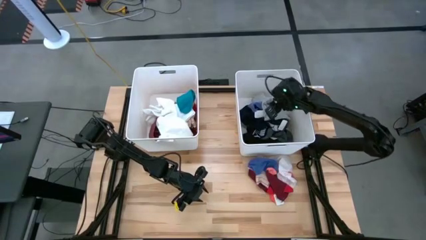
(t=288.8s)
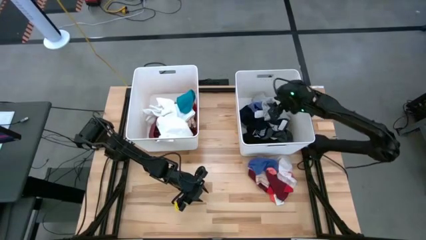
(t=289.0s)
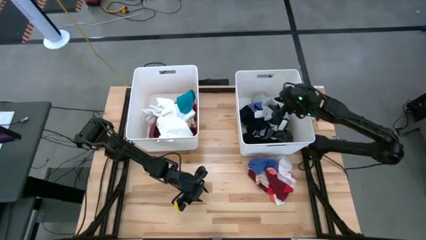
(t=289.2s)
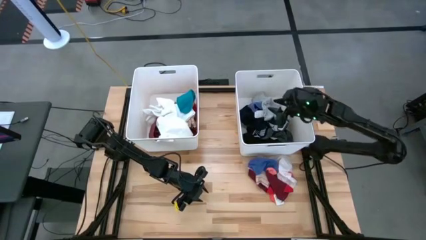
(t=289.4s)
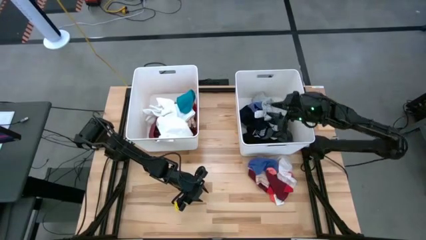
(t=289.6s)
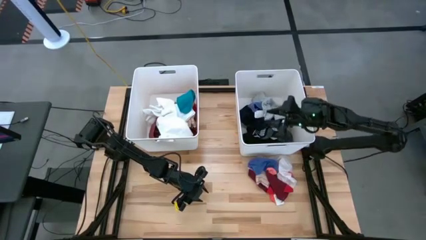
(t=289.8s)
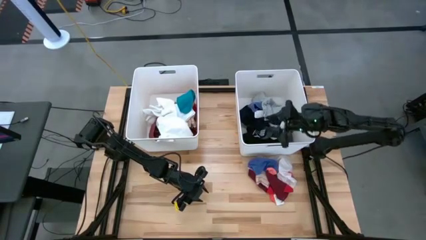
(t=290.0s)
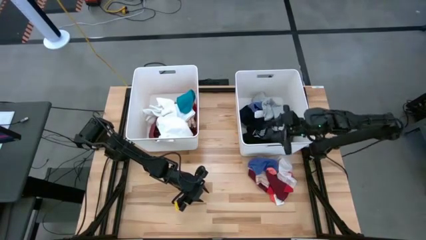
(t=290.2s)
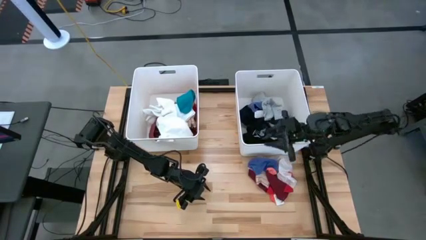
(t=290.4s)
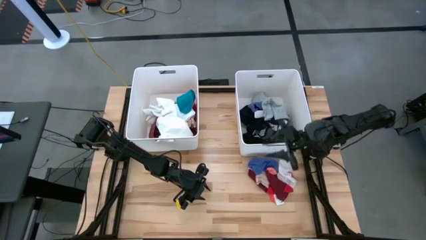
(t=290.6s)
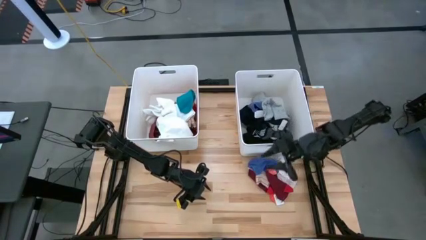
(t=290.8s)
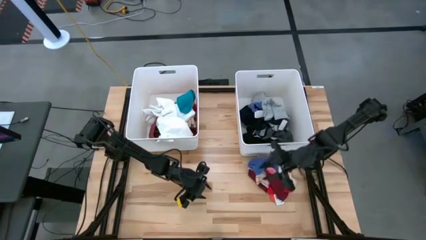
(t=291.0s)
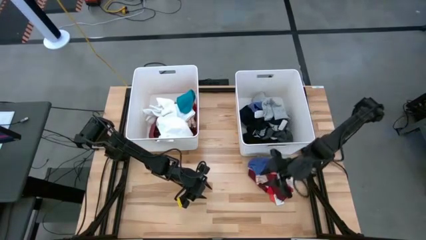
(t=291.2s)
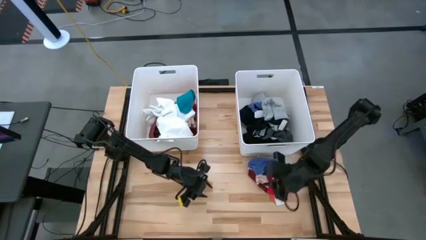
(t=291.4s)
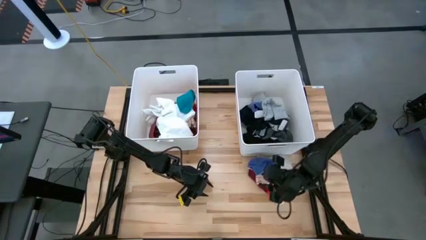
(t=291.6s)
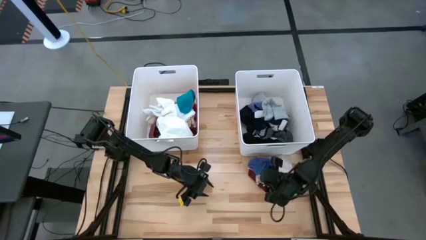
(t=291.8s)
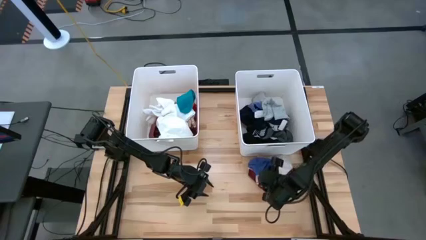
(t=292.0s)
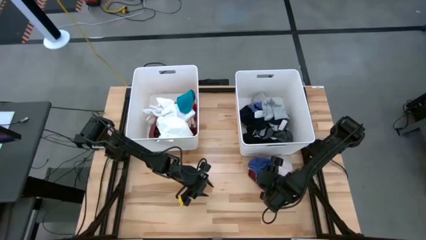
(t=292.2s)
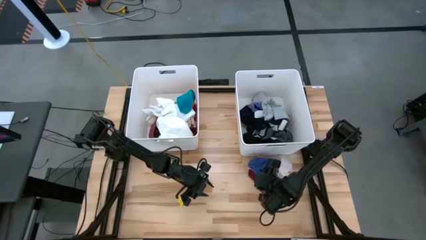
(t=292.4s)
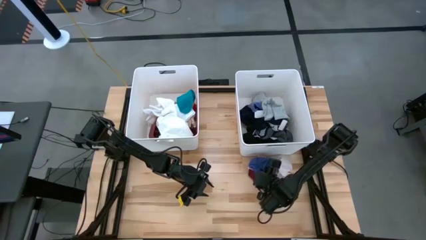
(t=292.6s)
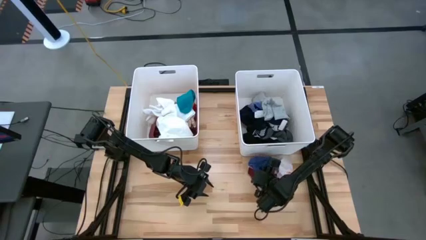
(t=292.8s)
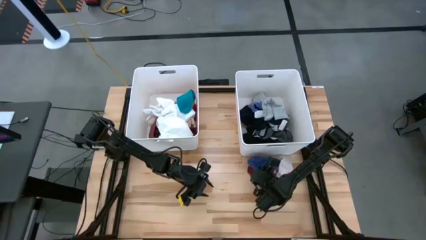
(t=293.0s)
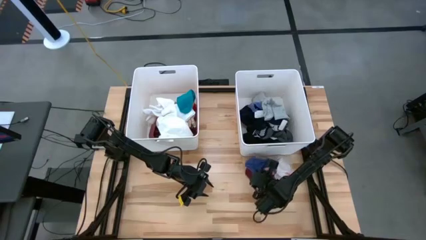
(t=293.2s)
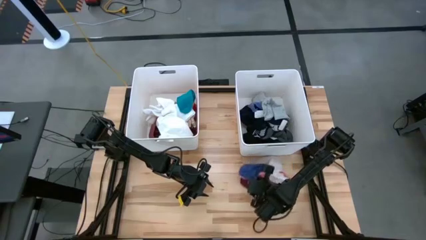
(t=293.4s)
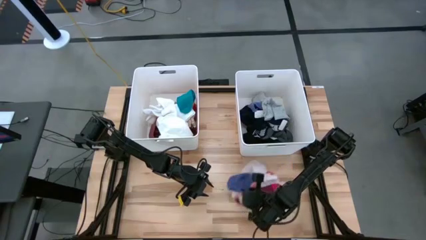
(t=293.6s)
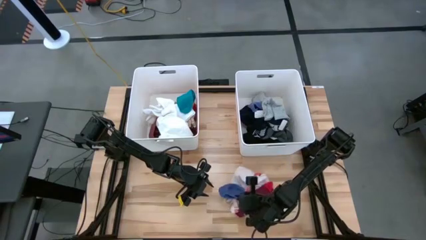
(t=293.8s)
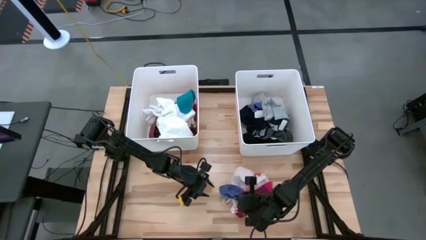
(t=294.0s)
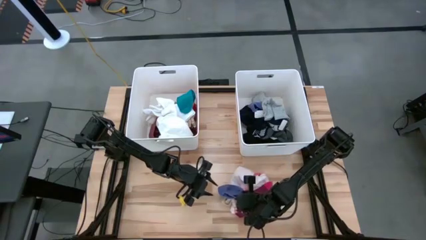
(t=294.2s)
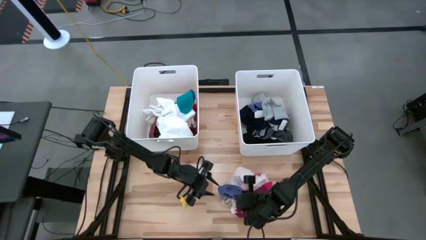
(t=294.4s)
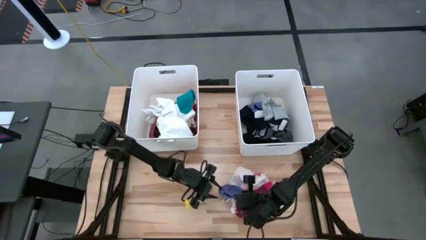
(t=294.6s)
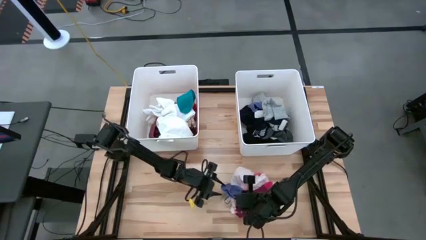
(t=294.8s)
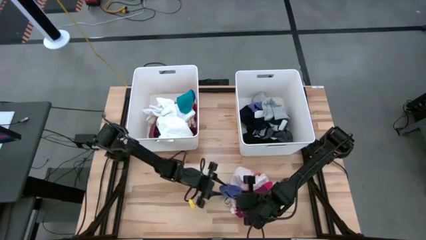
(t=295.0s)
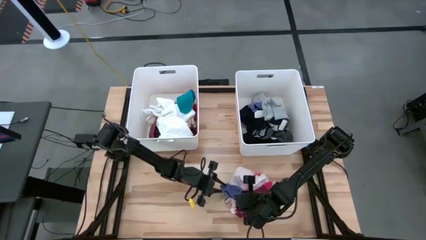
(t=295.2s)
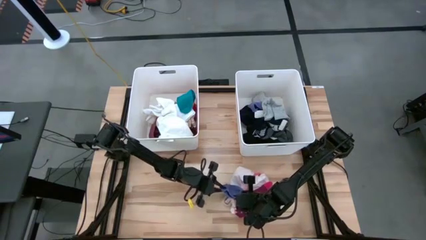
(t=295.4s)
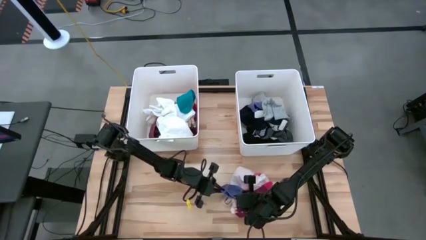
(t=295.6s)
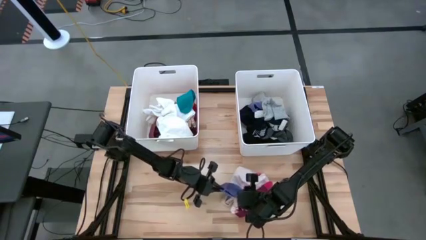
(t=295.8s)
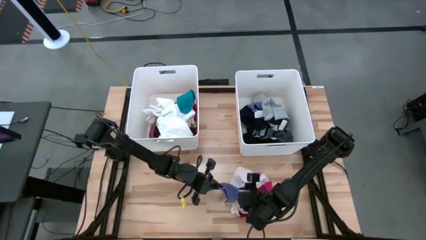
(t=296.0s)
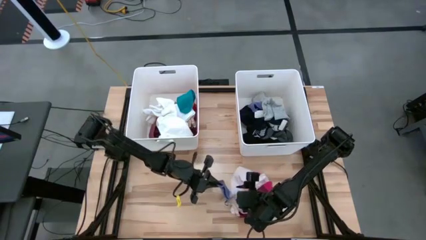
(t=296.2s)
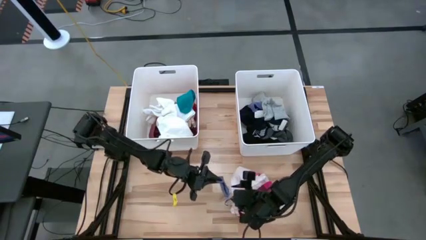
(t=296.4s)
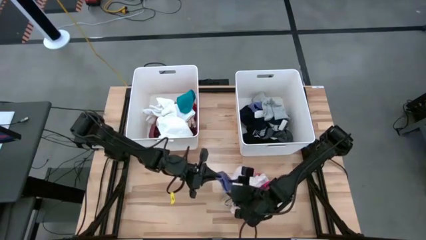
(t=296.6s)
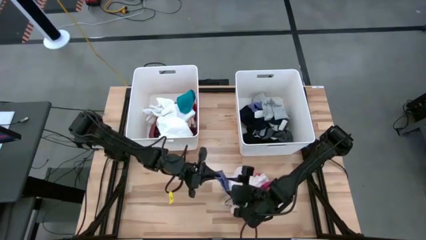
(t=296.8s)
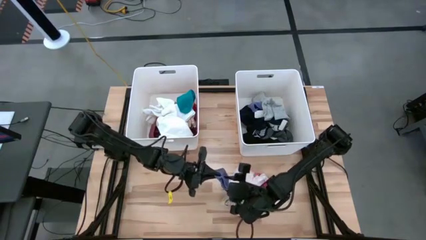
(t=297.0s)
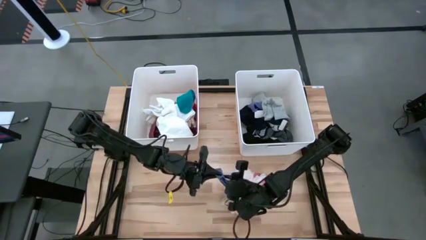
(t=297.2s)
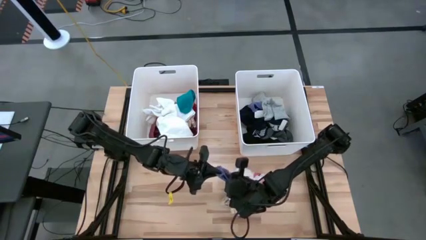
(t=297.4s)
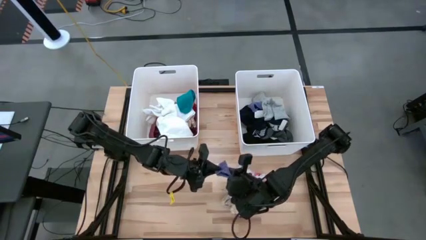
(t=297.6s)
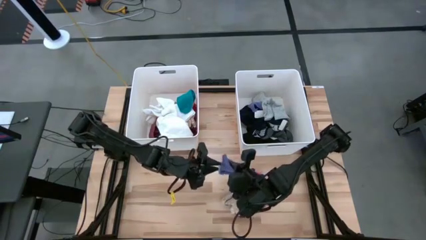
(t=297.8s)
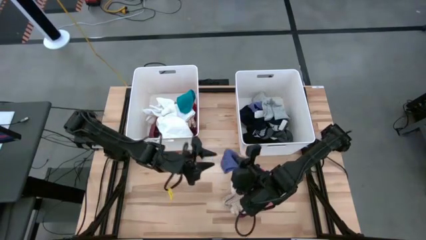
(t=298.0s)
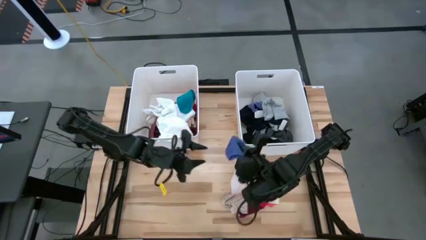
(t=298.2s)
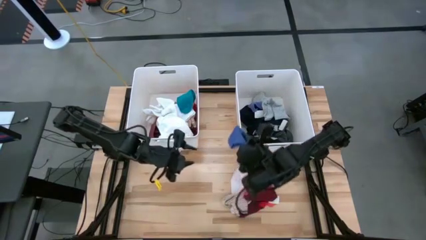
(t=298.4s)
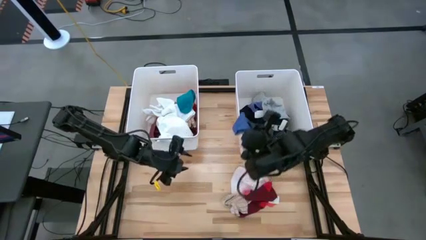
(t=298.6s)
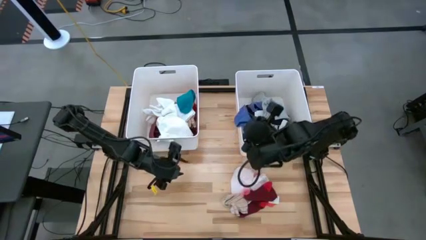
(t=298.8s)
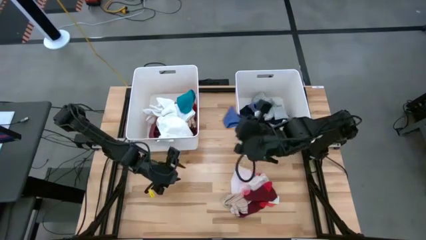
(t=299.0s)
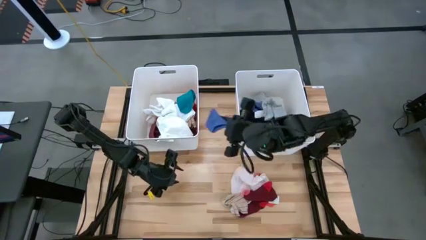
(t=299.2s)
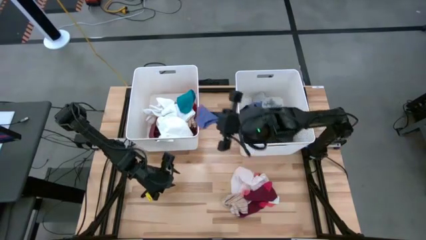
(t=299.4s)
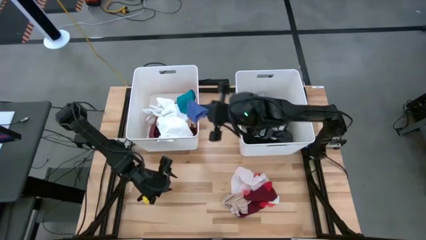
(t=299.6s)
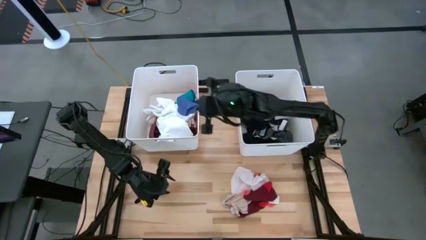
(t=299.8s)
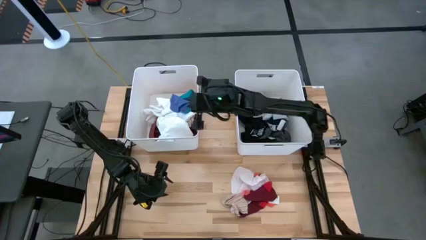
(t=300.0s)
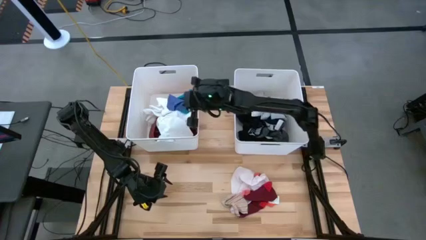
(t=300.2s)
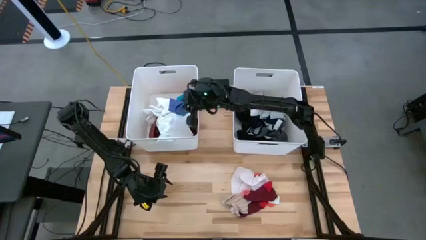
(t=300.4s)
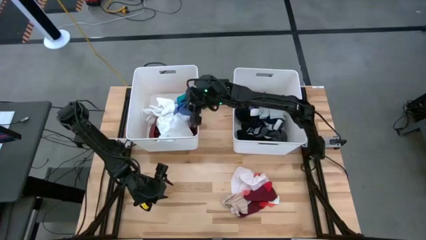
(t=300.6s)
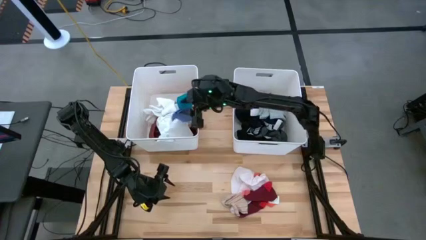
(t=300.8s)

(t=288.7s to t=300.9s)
Task: Sort clothes
Put the blue sock into the left white bin
